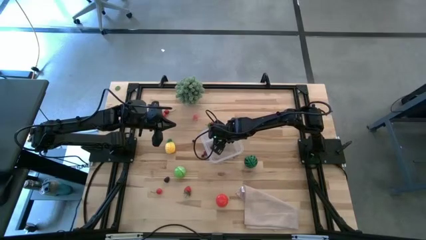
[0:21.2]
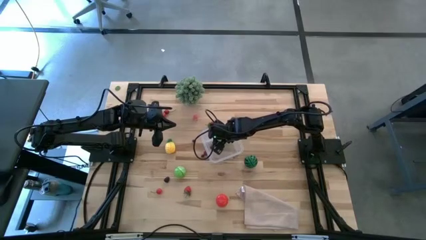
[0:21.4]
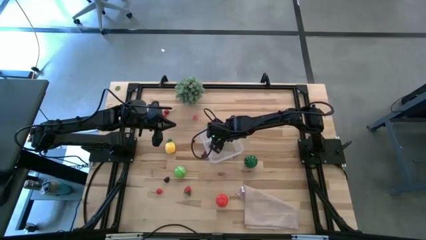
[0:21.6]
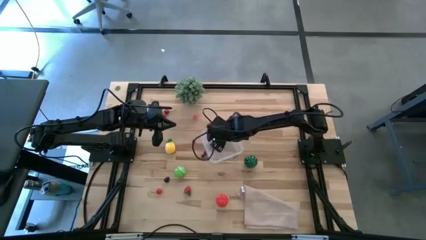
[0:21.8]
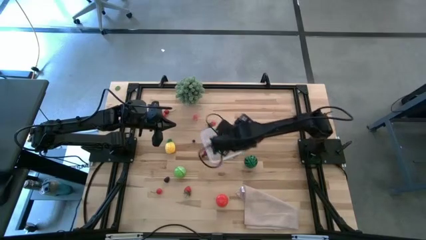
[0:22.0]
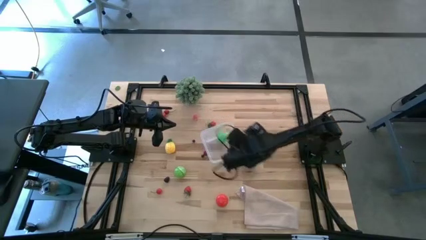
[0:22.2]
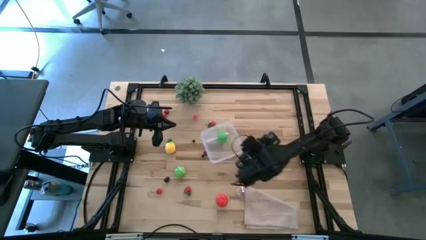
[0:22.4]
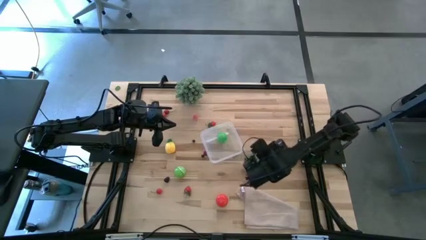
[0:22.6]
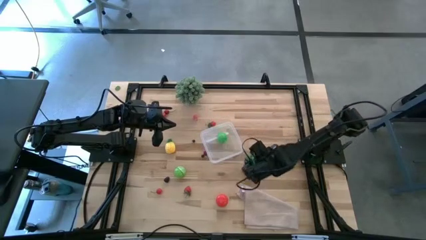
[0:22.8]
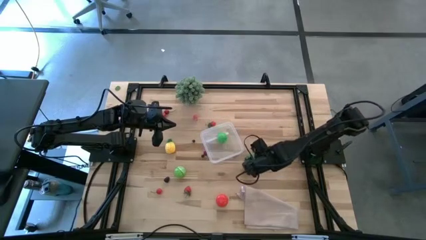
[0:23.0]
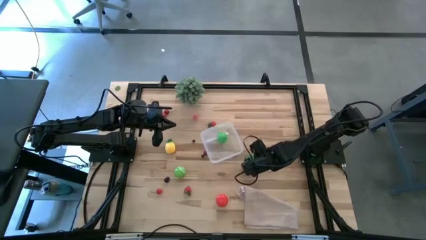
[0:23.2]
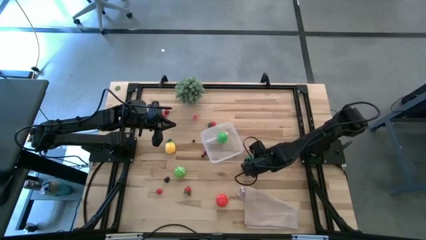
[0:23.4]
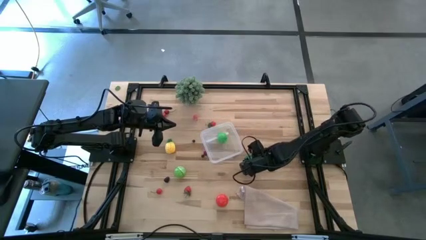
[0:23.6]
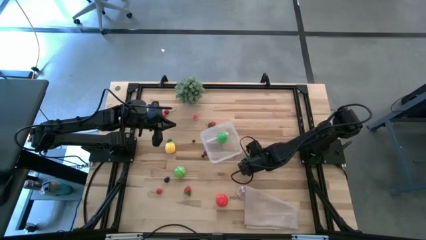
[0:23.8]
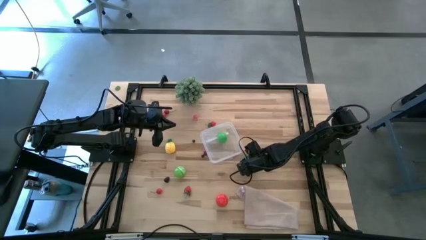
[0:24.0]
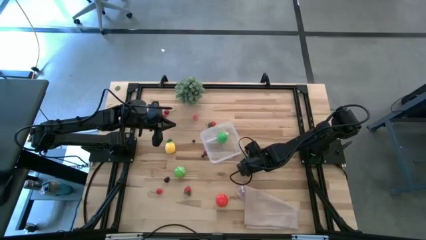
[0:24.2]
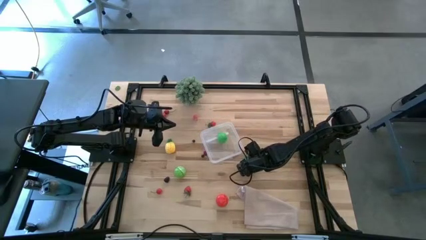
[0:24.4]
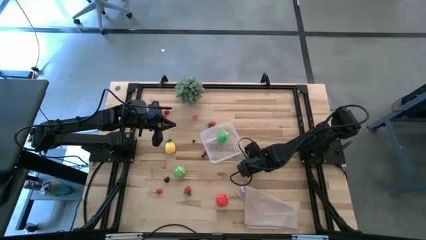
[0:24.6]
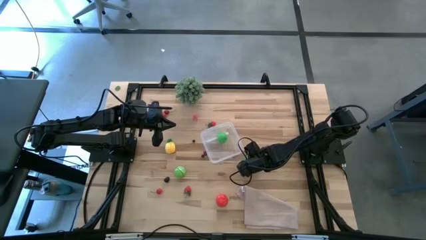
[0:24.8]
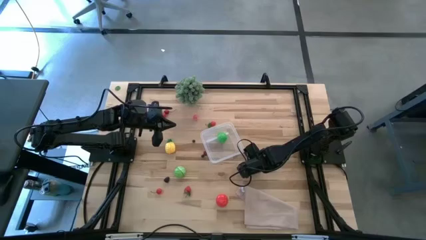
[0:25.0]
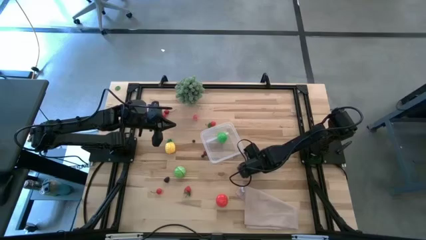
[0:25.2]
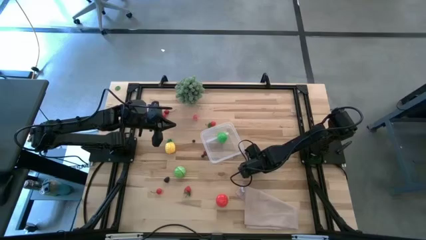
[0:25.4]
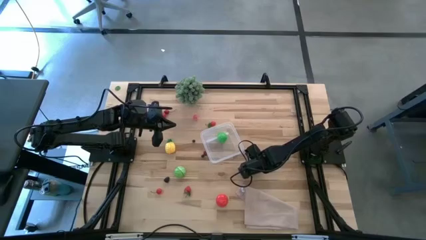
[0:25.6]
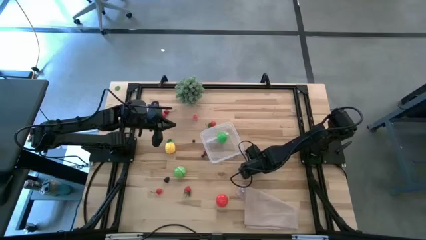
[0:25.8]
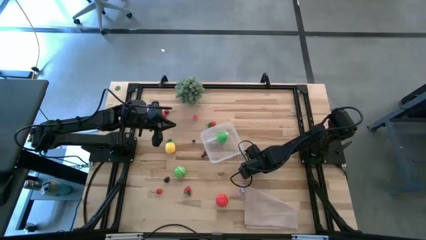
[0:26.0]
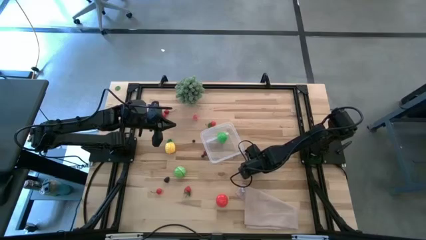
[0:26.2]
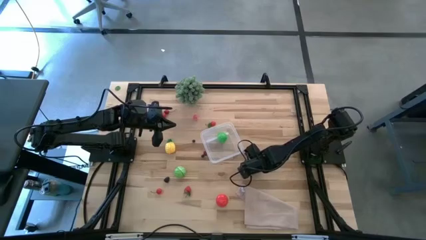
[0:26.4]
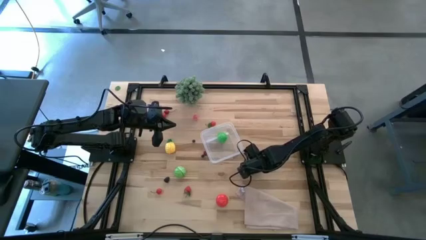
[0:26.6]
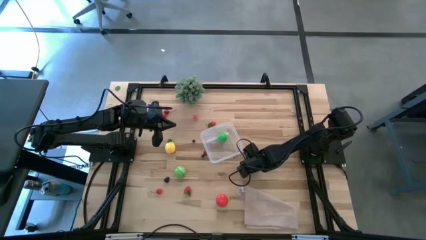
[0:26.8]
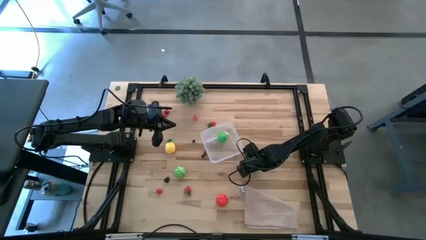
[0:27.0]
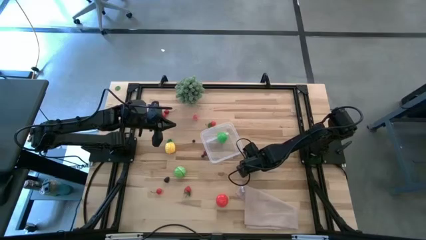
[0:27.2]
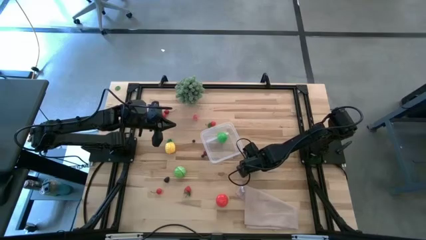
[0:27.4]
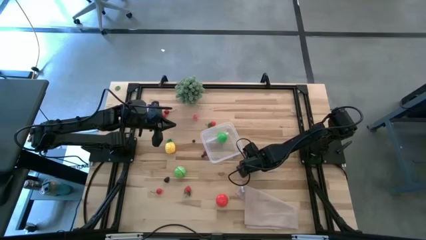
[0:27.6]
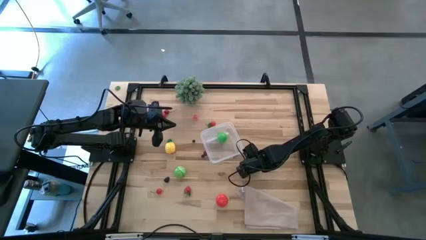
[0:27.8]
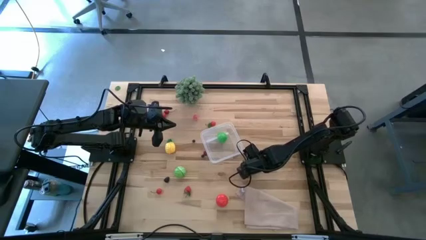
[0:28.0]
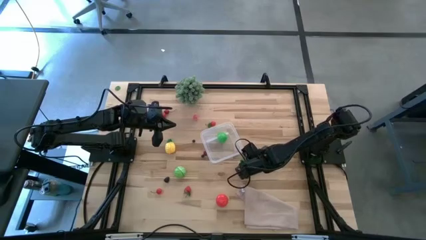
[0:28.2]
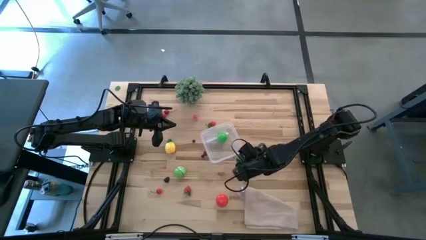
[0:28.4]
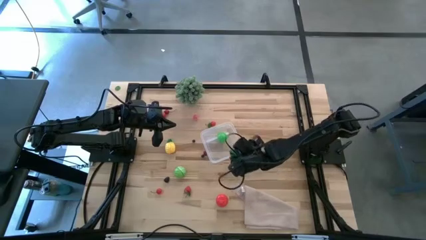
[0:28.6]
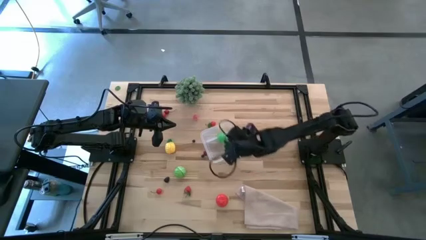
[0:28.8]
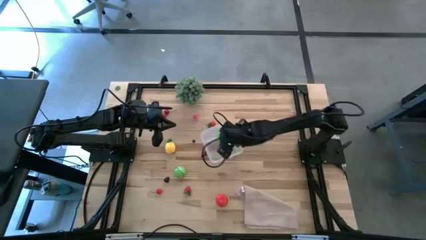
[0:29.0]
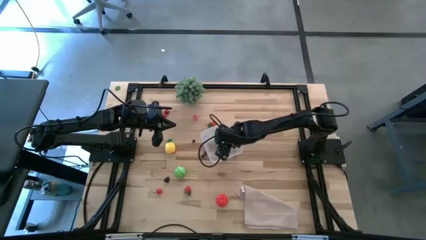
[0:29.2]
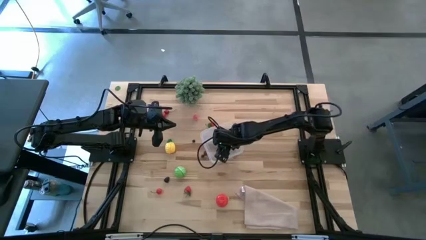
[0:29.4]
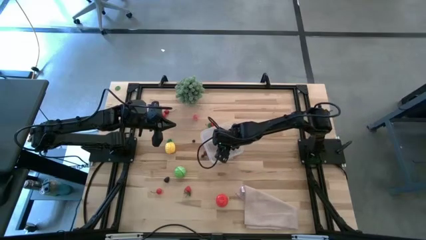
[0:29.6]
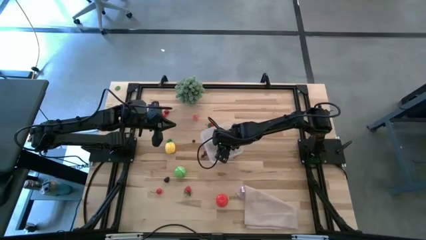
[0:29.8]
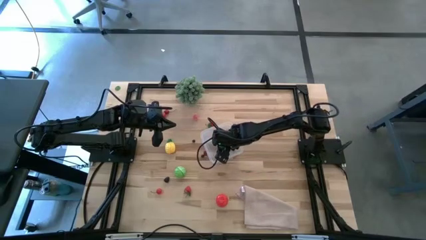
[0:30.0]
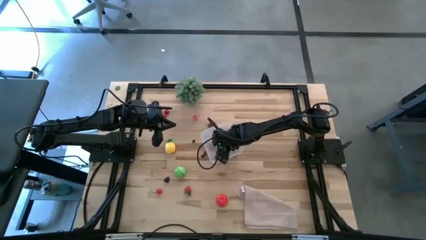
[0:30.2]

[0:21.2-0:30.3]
Task: Pick and placing Produce into tupperware
Put the green watermelon into the transparent bin

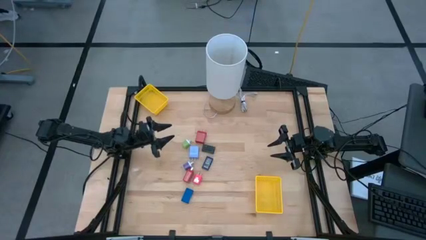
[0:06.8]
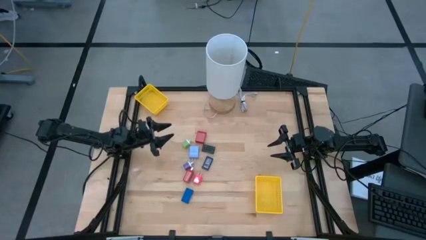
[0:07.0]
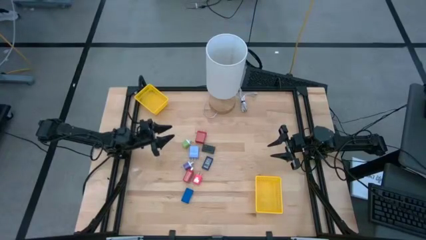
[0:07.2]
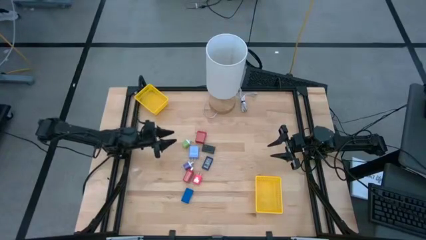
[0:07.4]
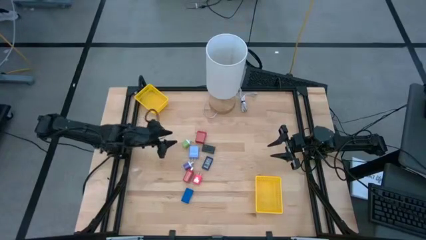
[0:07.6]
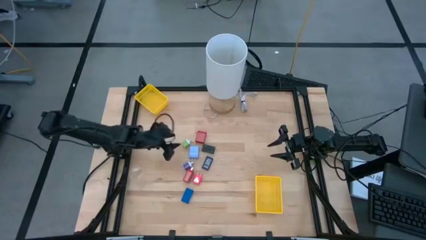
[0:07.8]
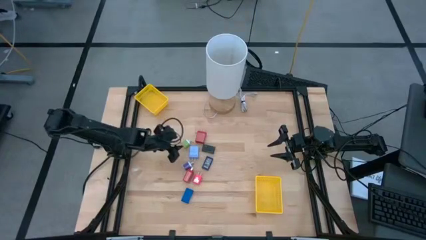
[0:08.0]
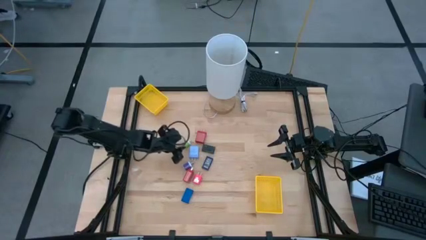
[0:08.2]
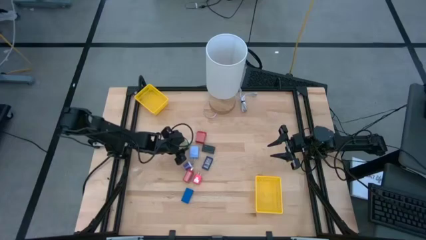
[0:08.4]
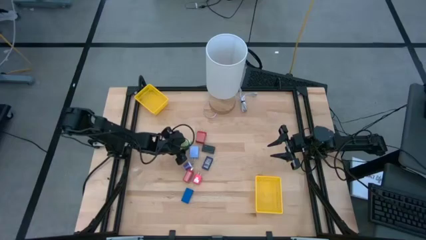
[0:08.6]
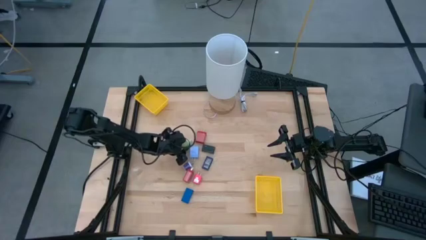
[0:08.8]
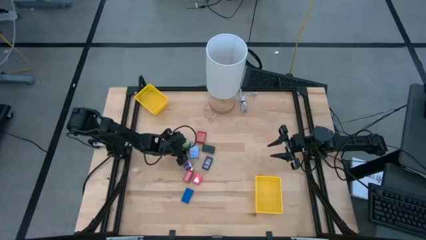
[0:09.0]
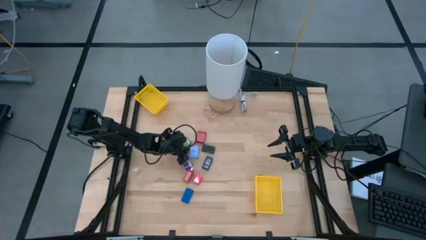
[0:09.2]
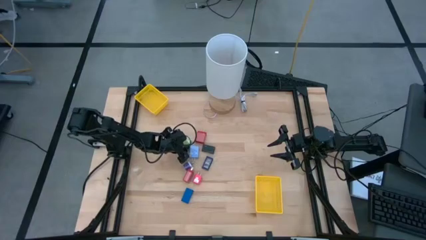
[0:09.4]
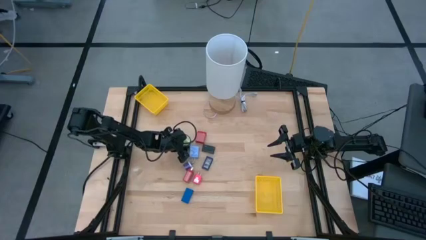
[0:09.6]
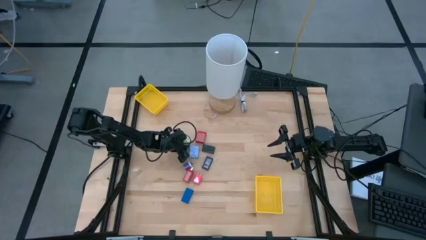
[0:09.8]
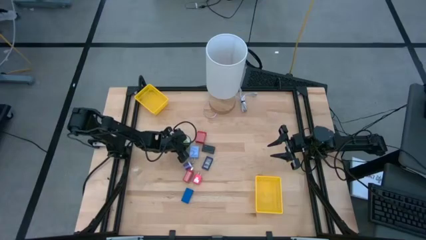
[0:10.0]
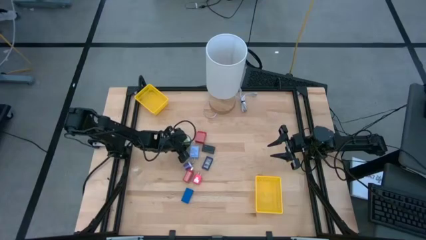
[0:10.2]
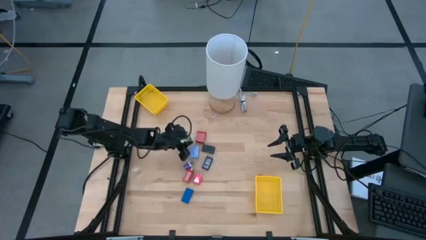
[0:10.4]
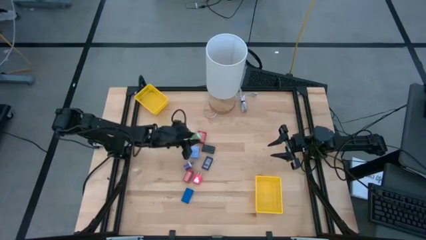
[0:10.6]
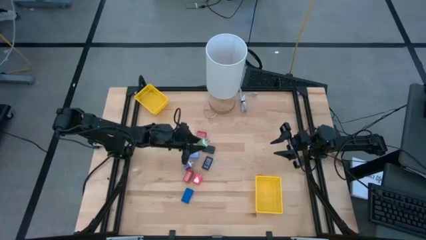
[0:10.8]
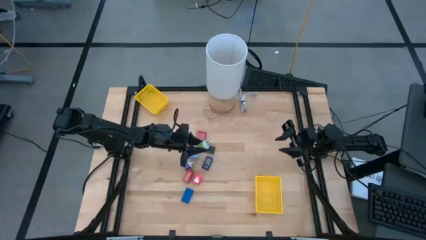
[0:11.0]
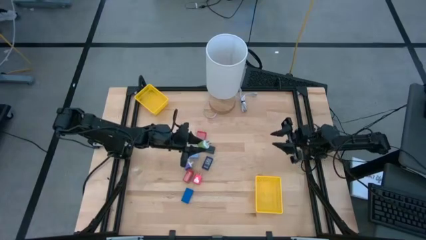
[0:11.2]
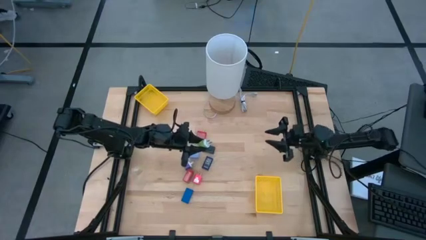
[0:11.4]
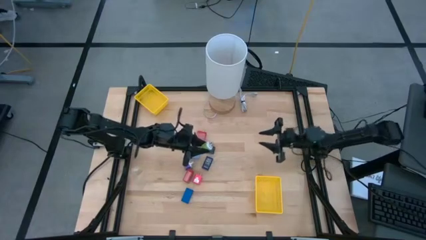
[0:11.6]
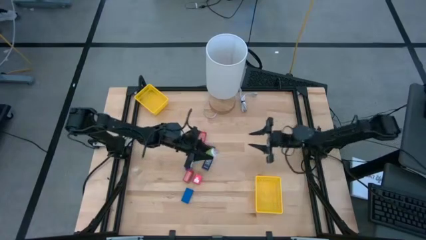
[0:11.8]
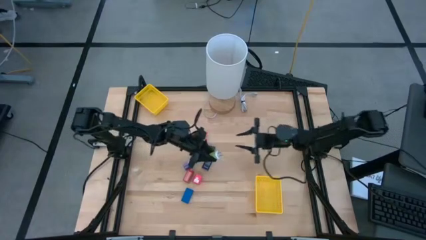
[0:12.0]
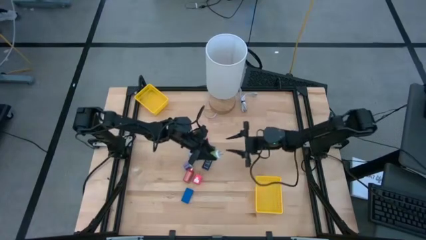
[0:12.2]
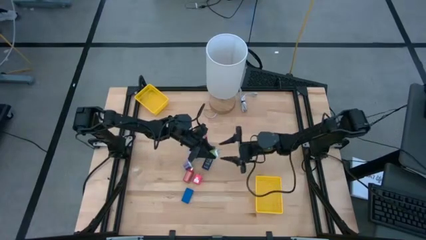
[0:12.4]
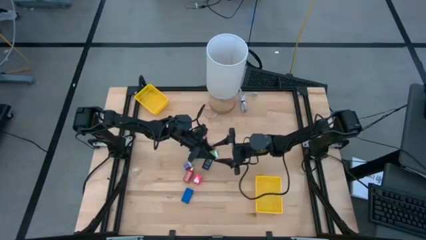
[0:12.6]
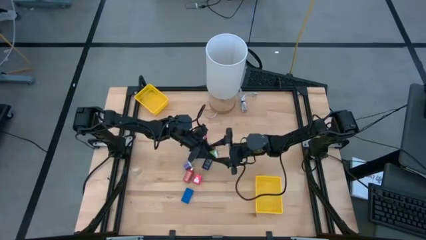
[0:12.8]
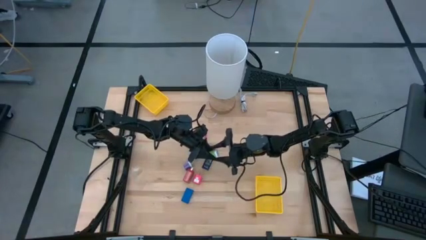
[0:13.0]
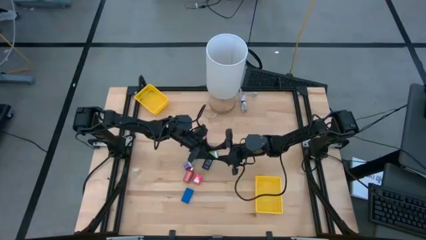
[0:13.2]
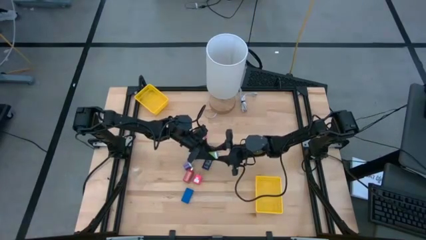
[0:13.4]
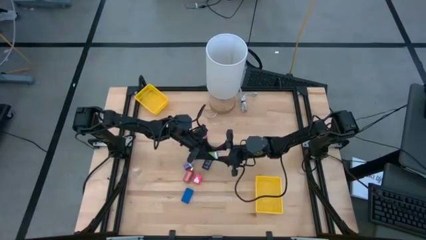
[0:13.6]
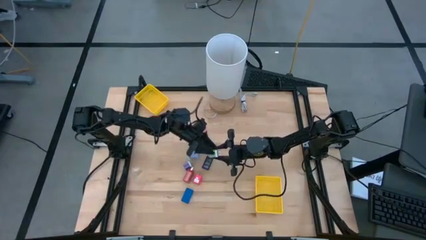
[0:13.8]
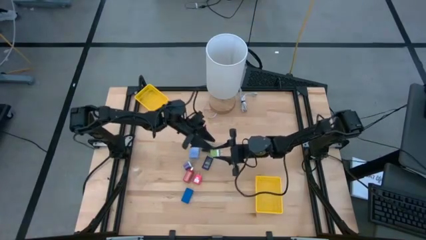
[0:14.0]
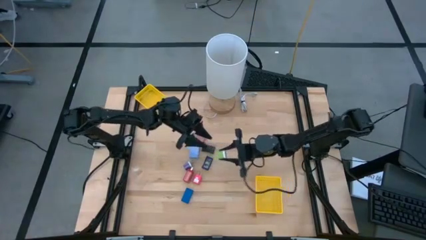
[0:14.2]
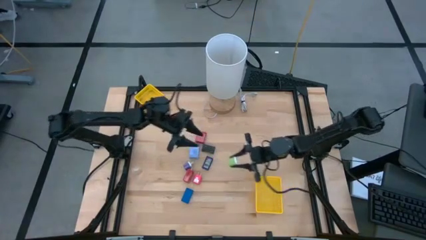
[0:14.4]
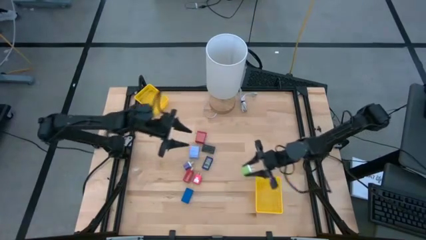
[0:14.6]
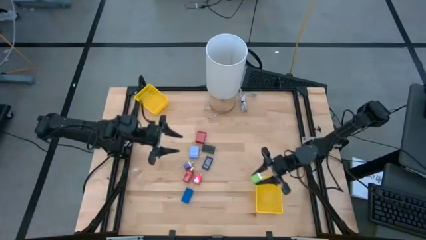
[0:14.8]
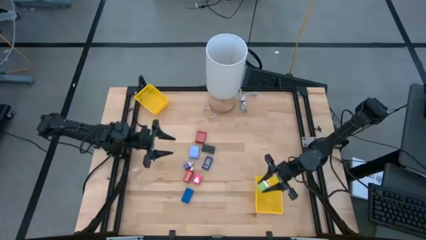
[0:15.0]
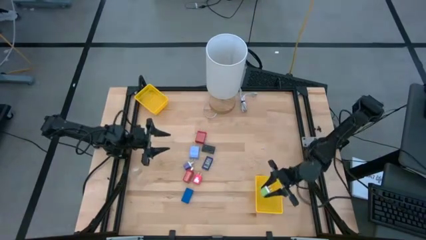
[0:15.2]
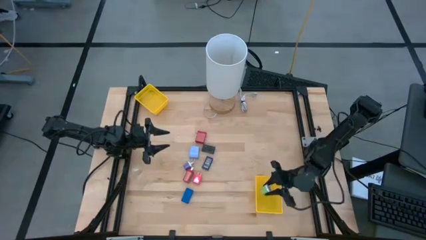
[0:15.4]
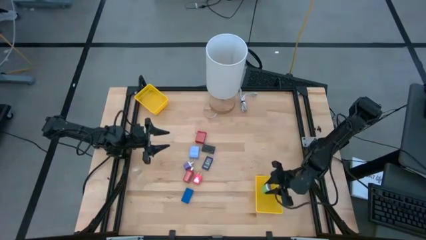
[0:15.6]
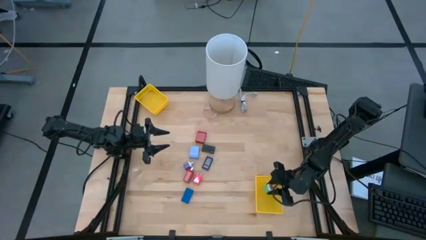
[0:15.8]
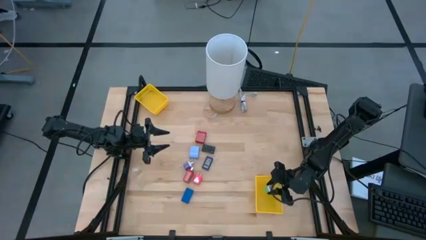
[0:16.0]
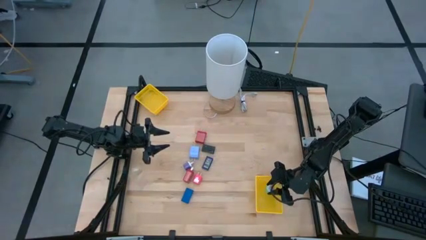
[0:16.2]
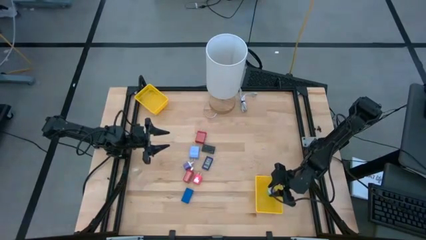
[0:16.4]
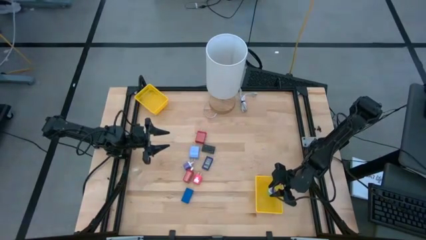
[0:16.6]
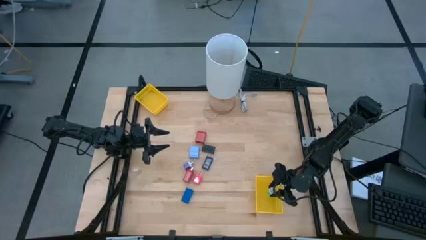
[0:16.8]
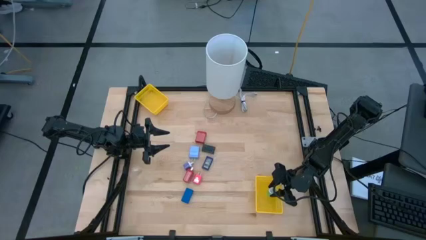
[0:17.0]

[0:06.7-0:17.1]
Task: Pick & Place Office items
Put the green charger adapter into the bottom yellow bin
